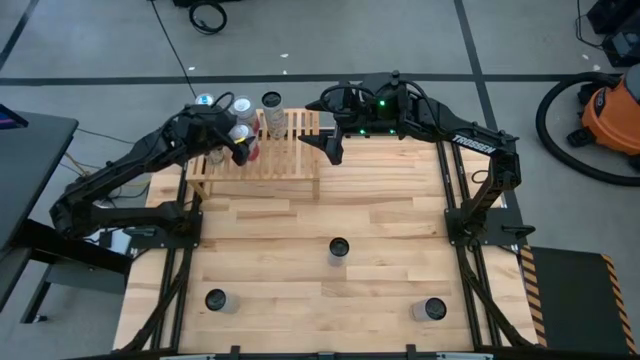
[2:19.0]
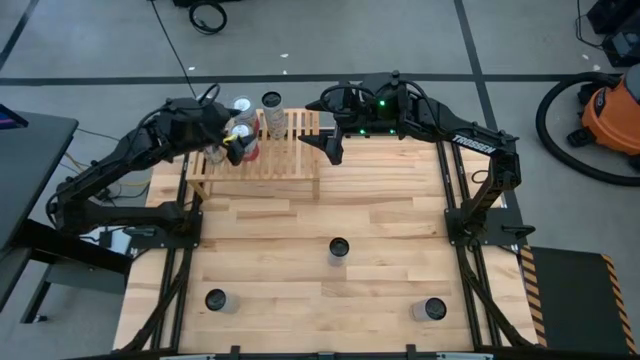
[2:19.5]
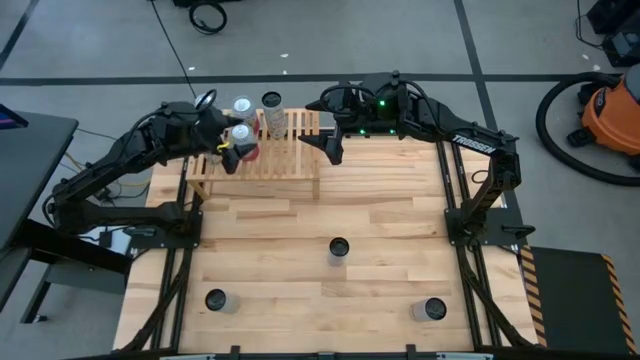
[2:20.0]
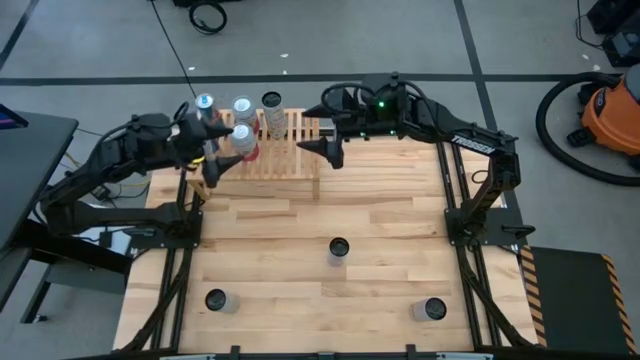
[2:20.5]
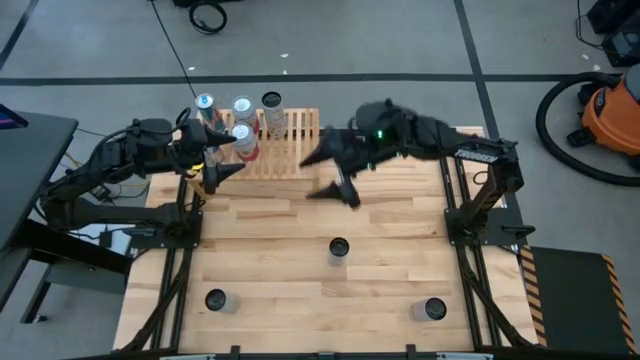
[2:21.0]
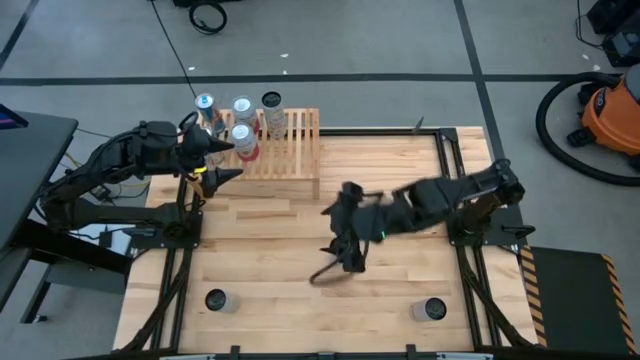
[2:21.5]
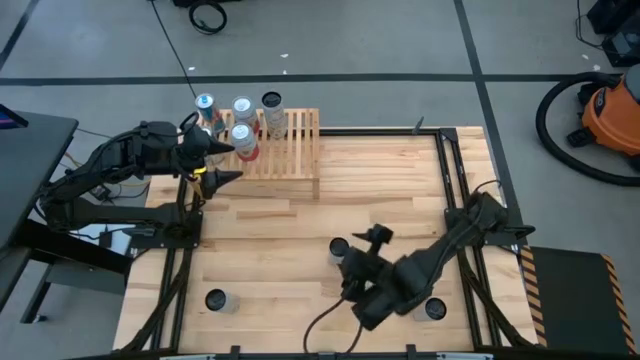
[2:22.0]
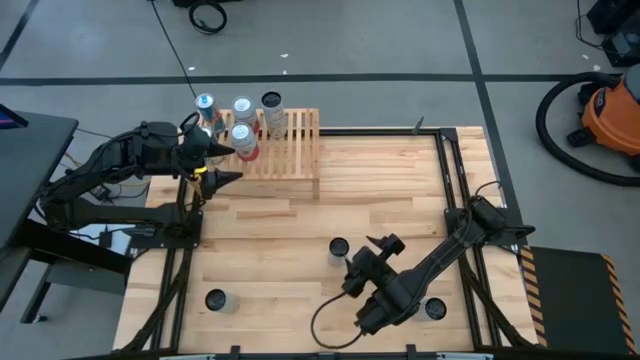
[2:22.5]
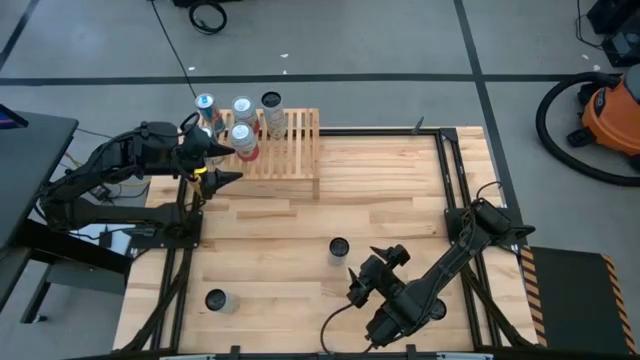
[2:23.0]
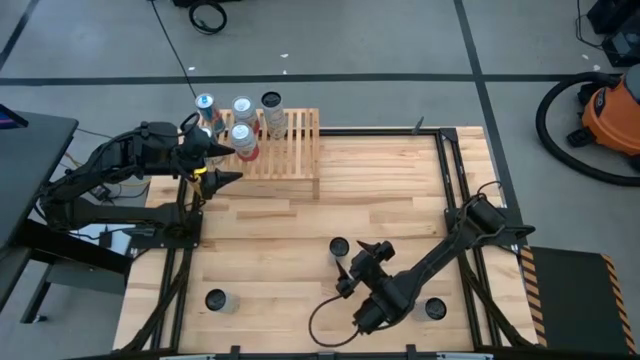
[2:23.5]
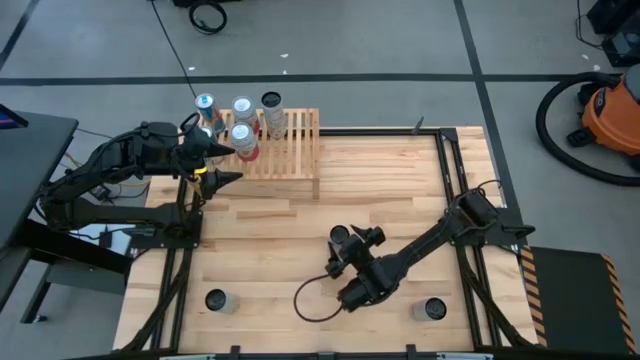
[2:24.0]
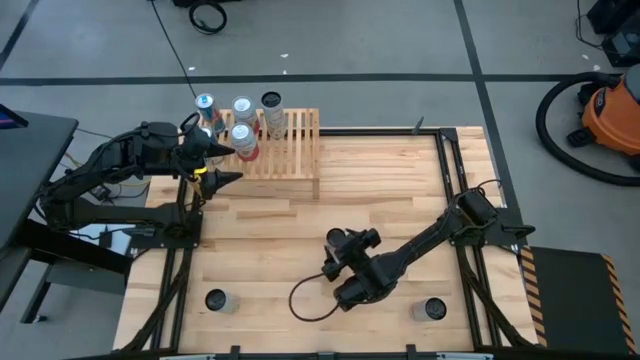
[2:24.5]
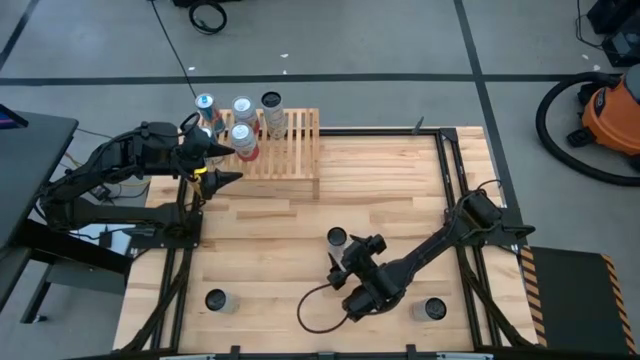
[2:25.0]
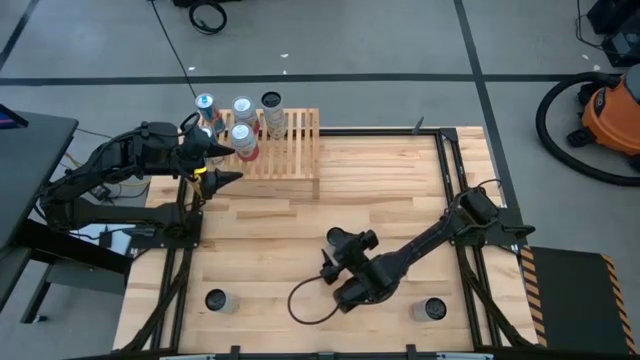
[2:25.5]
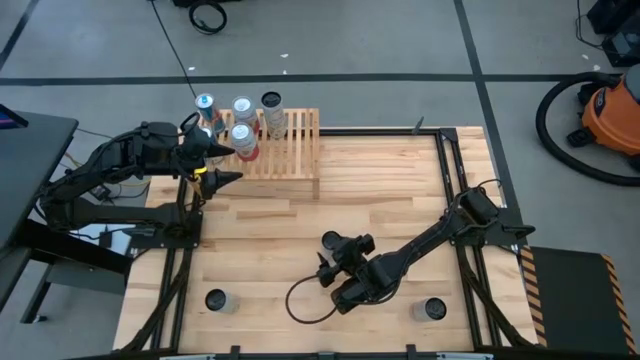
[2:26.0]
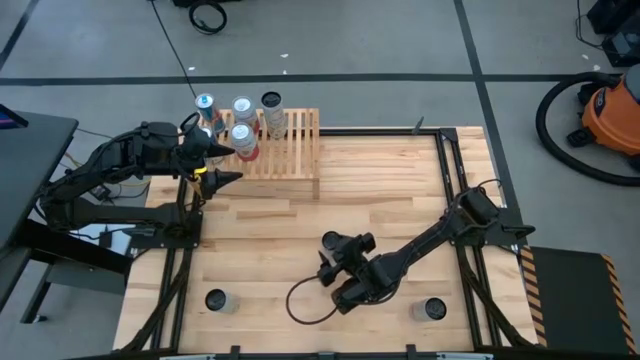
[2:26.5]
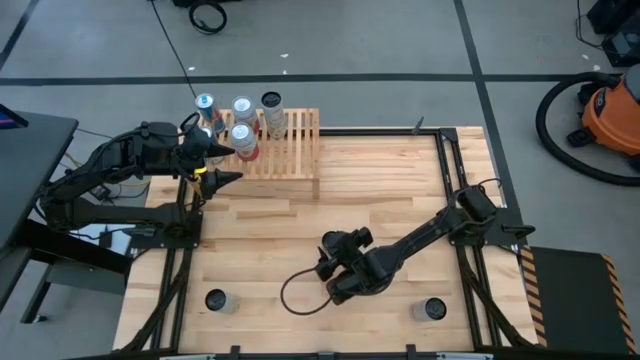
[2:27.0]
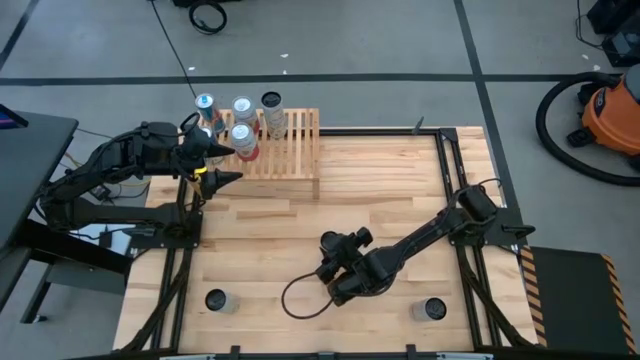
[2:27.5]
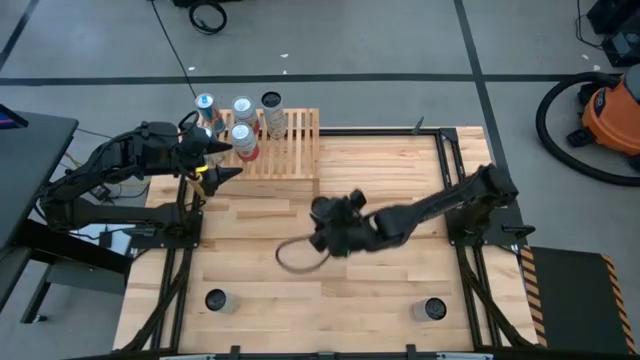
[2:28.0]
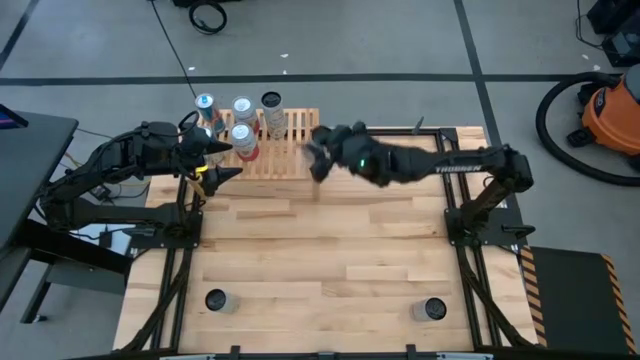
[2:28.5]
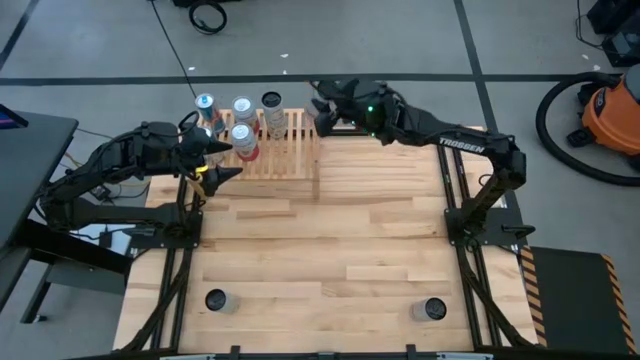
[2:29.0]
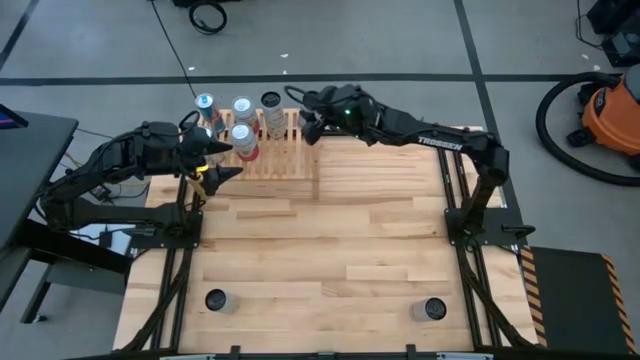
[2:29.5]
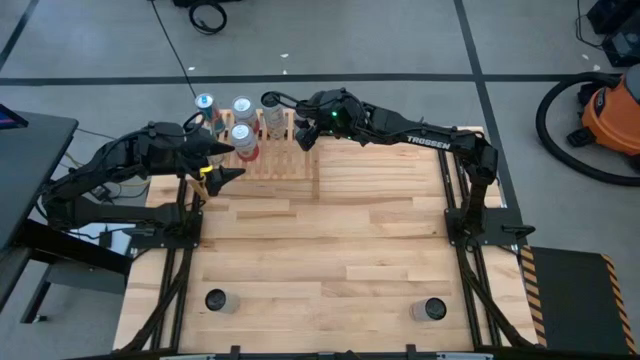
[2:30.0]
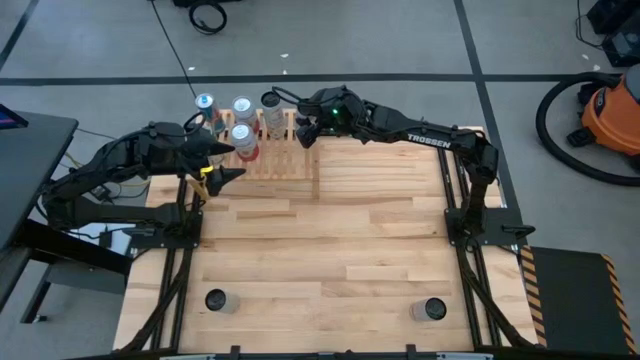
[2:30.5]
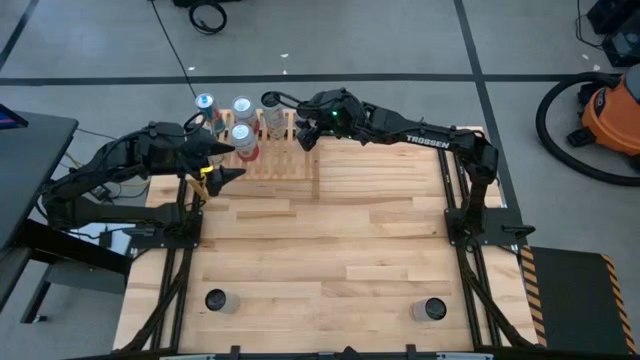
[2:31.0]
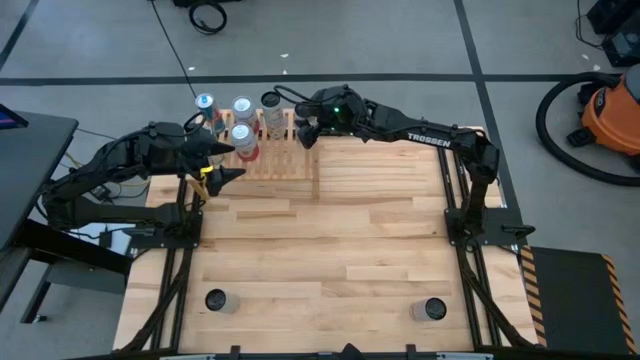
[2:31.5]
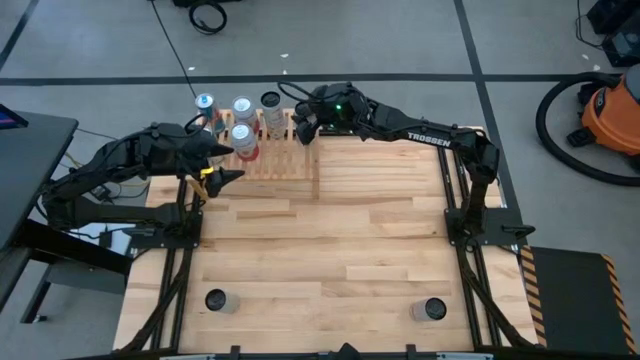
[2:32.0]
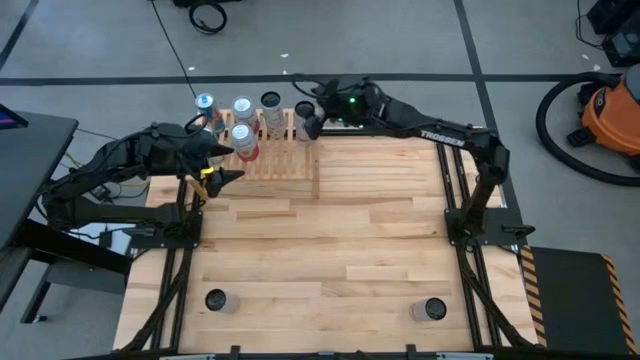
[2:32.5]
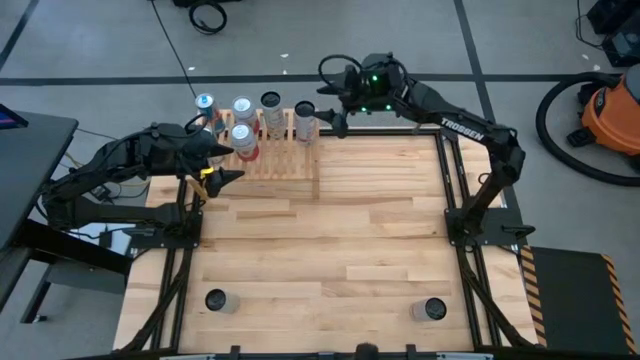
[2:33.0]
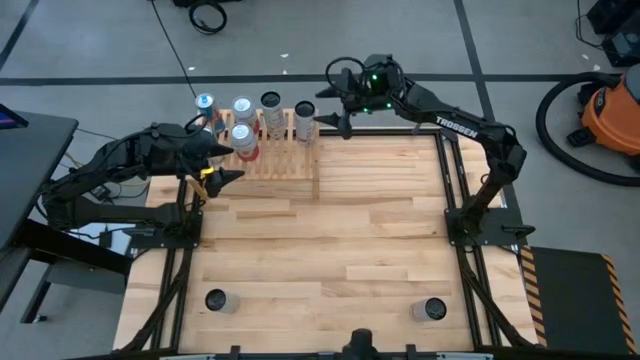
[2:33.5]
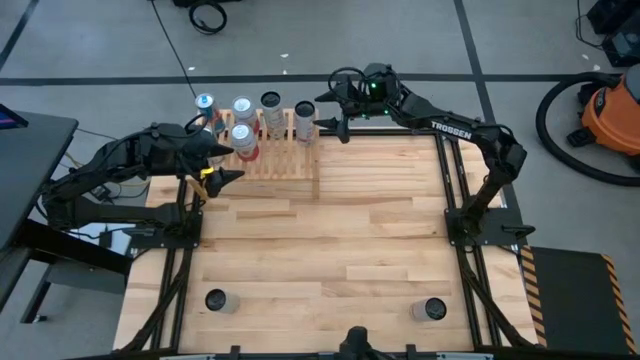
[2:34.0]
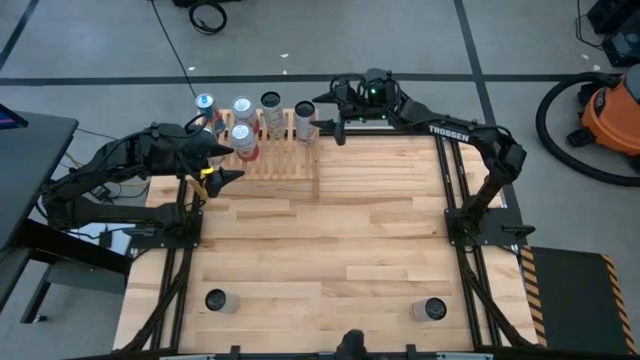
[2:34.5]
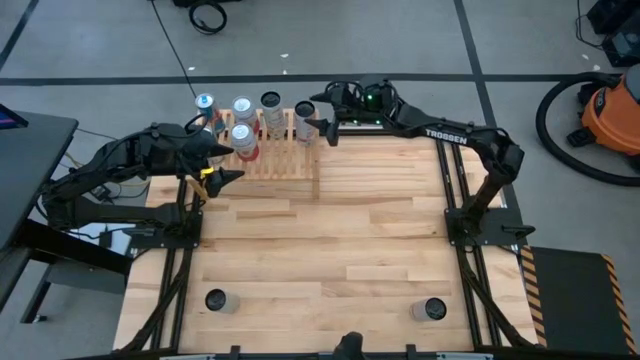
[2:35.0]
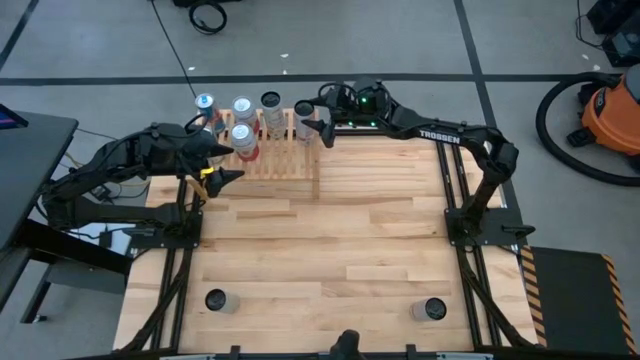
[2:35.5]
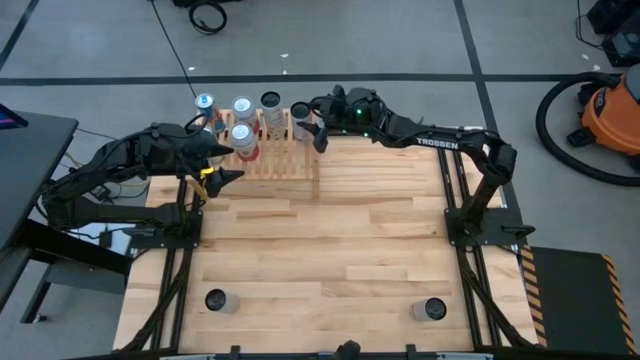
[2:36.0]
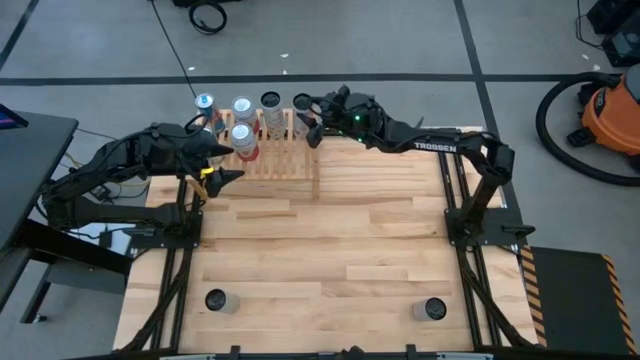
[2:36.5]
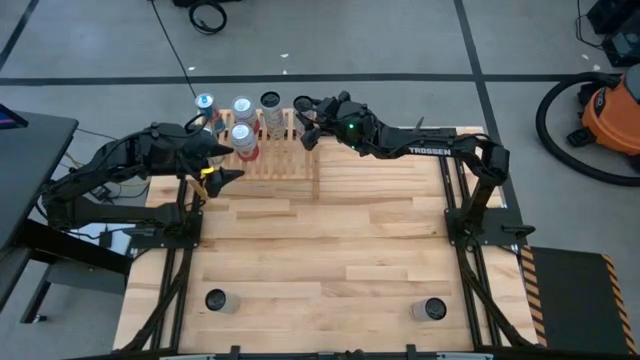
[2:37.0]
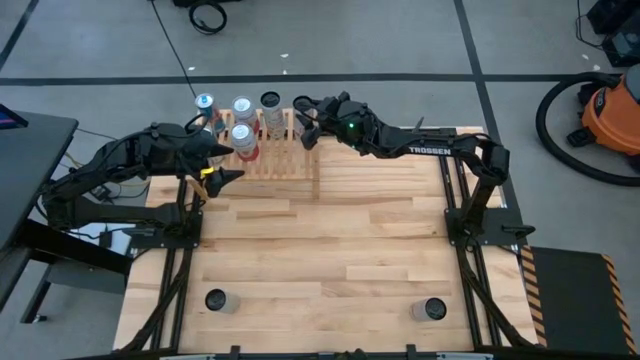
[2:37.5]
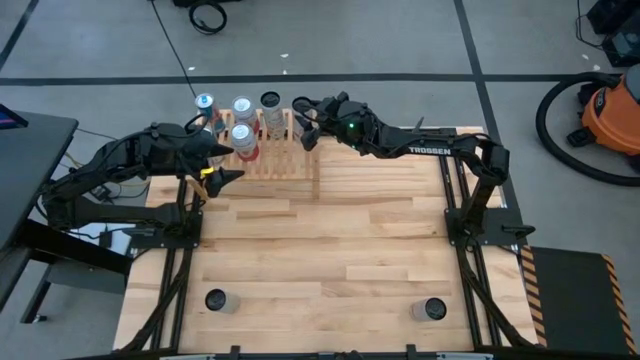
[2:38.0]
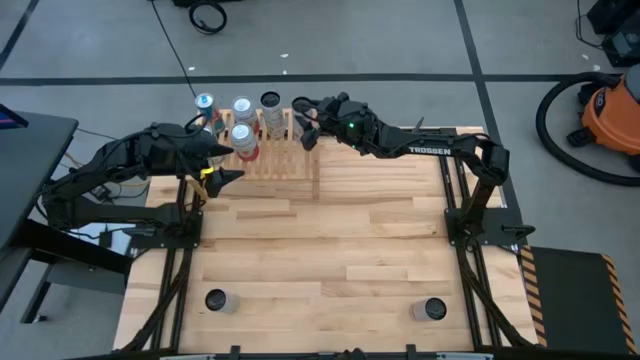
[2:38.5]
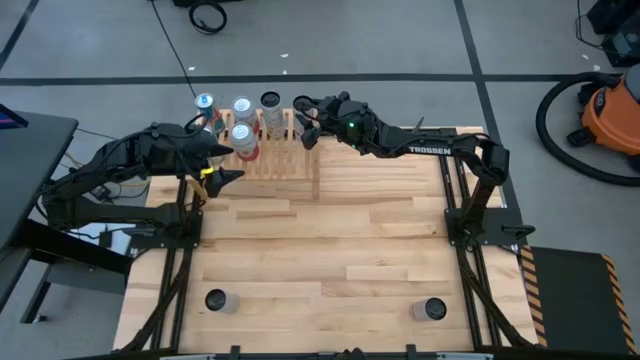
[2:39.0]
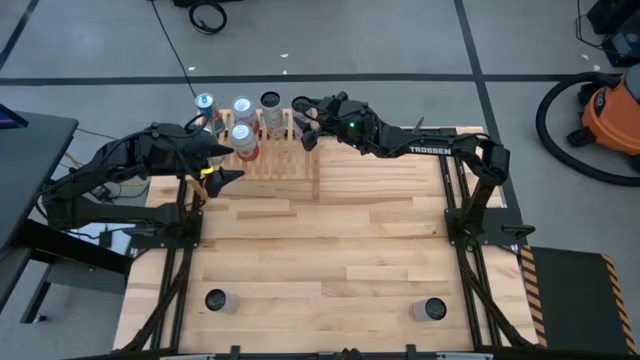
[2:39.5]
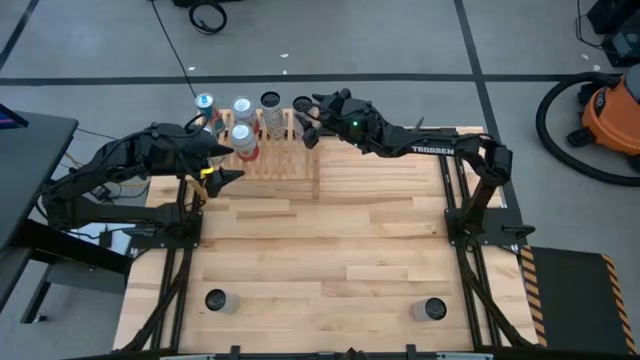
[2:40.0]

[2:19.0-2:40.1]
Task: Place canned beverage on shelf
Put the top white and pink soda can on the shelf

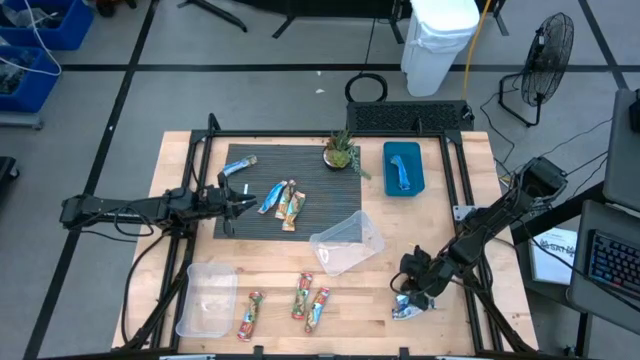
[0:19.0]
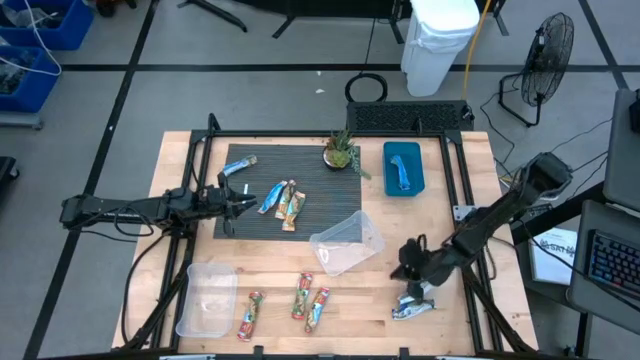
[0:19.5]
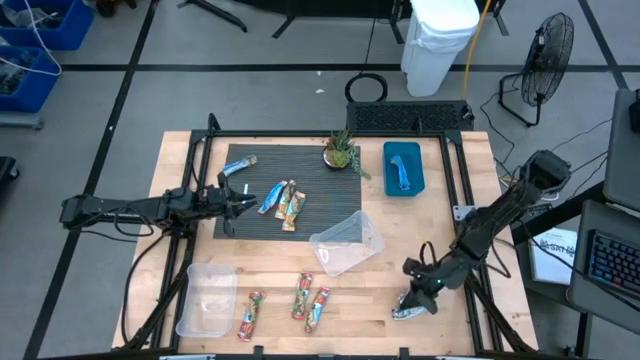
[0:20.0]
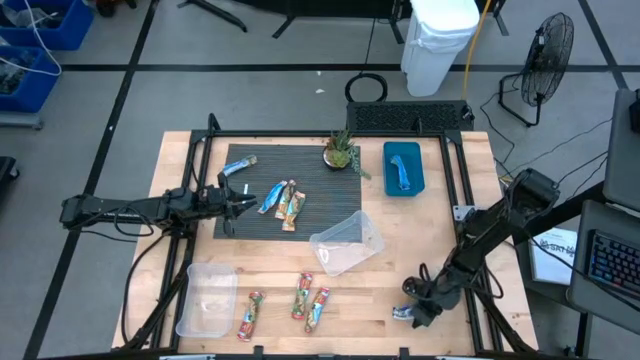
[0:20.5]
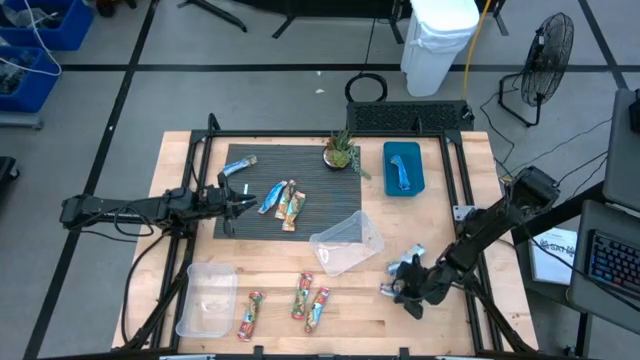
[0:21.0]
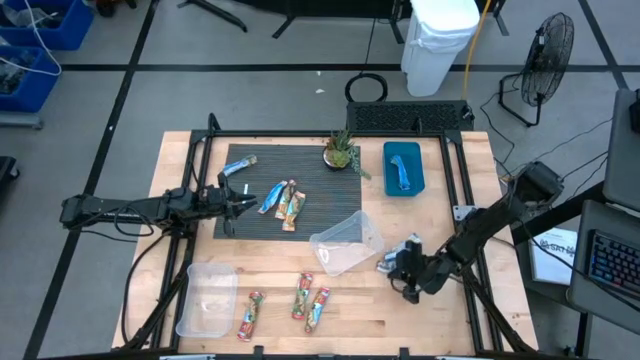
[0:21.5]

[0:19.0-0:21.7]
Task: Pick and place Granola Bars by type
Move the blue granola bar to the middle right of the table
